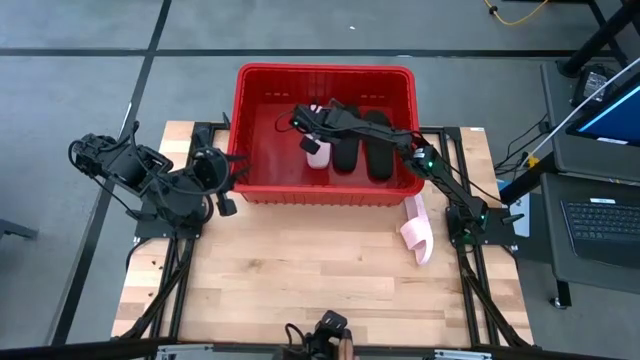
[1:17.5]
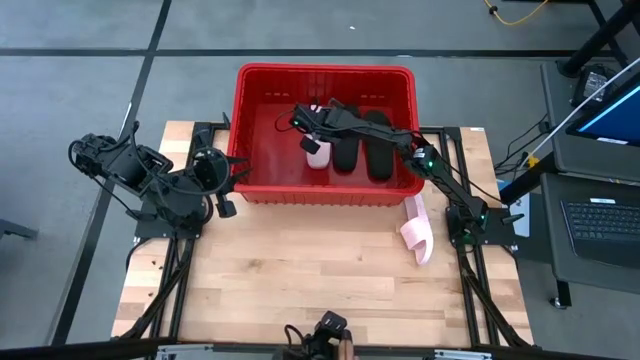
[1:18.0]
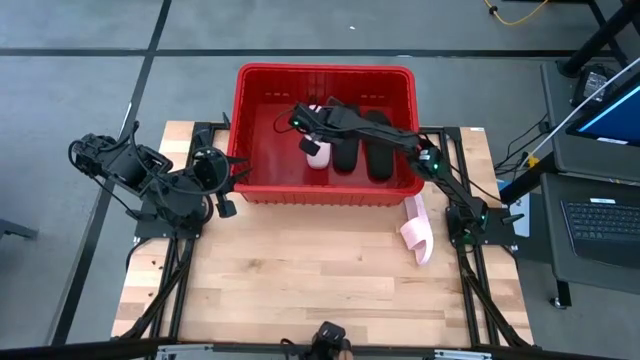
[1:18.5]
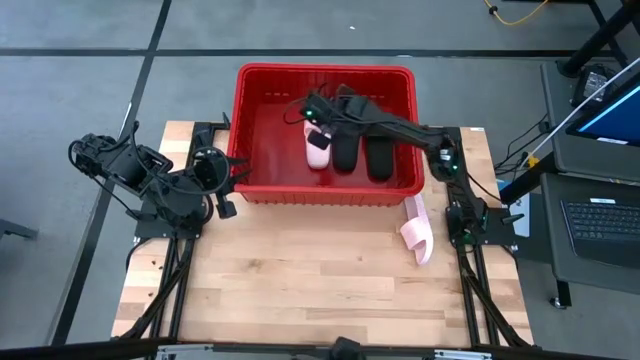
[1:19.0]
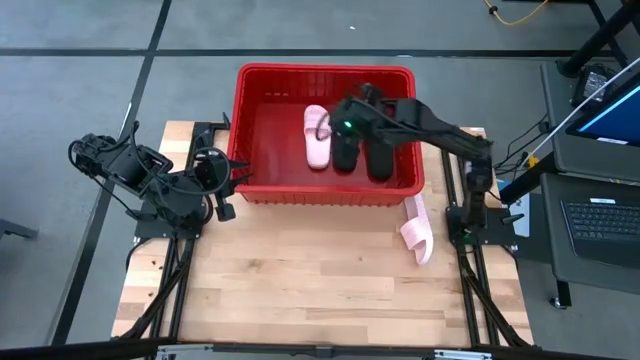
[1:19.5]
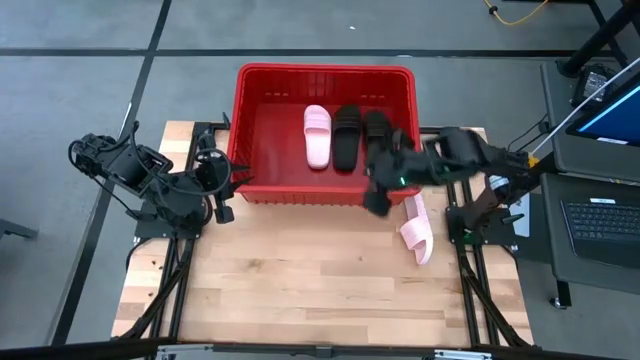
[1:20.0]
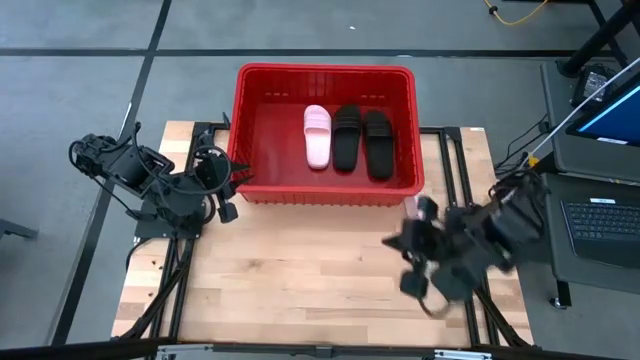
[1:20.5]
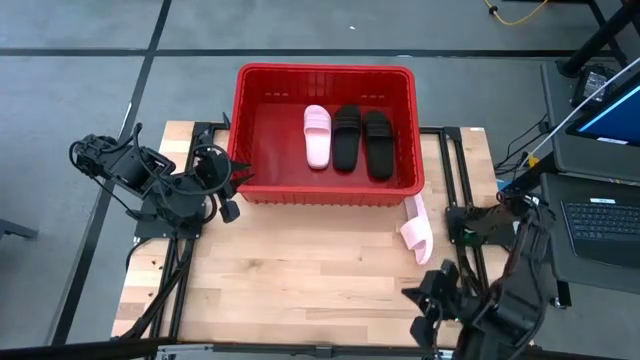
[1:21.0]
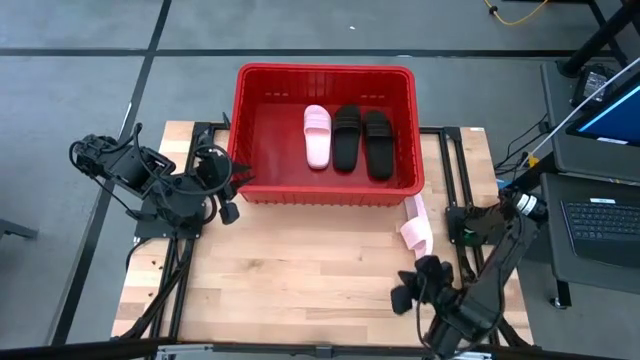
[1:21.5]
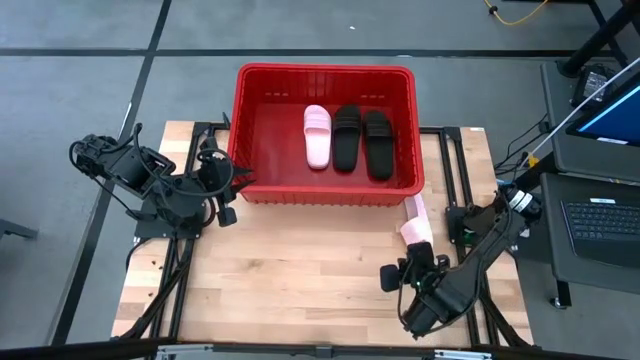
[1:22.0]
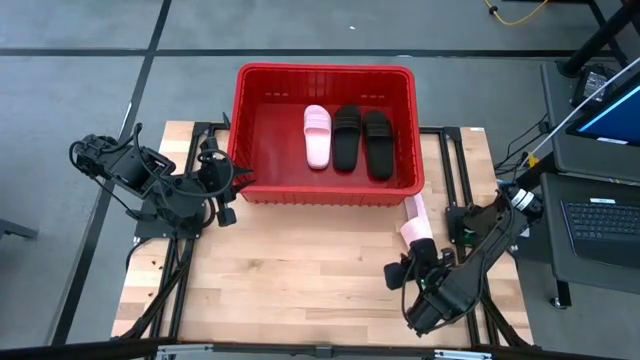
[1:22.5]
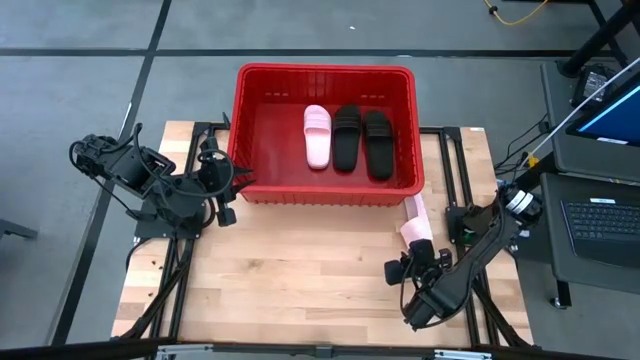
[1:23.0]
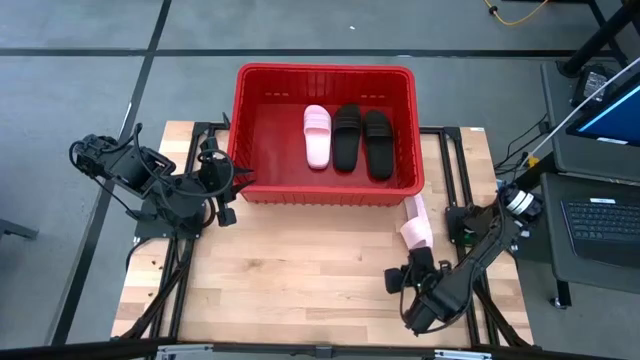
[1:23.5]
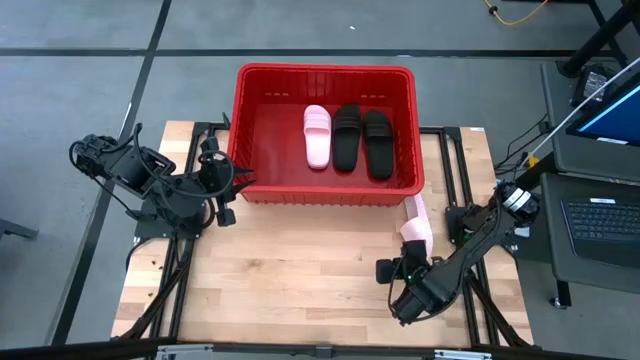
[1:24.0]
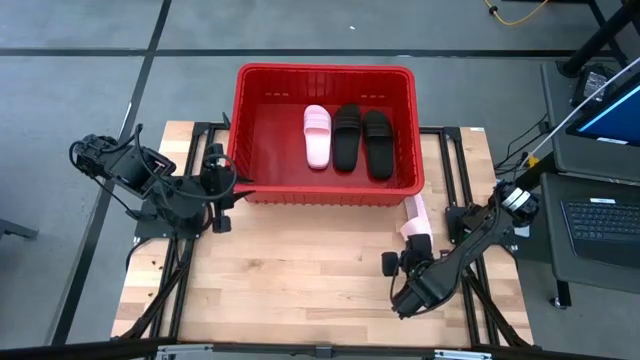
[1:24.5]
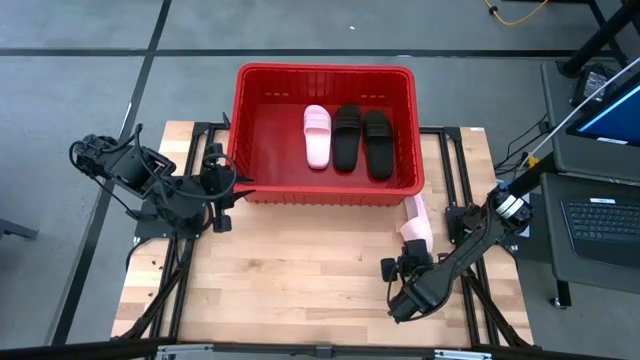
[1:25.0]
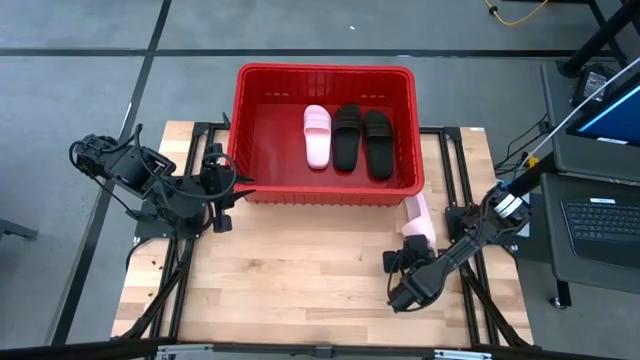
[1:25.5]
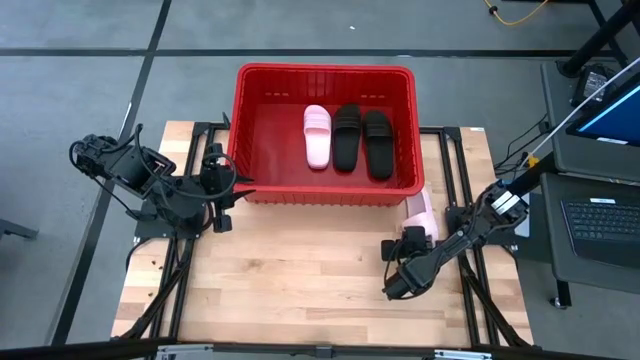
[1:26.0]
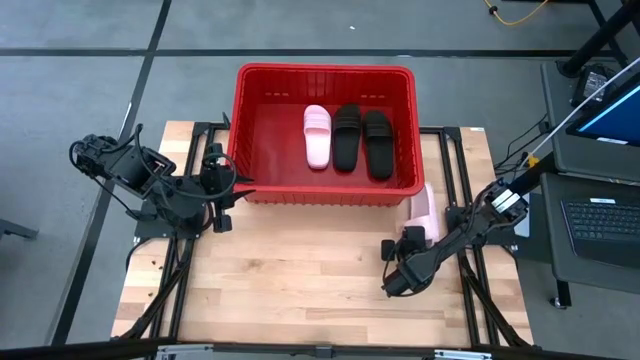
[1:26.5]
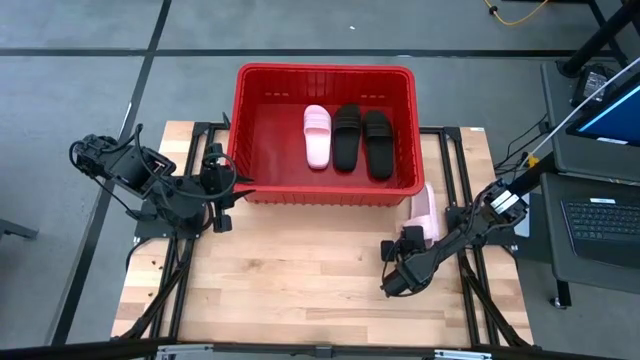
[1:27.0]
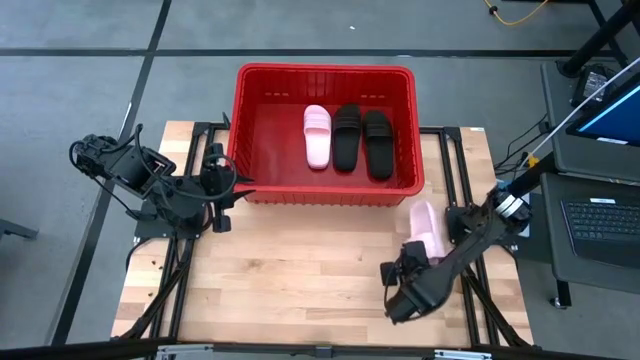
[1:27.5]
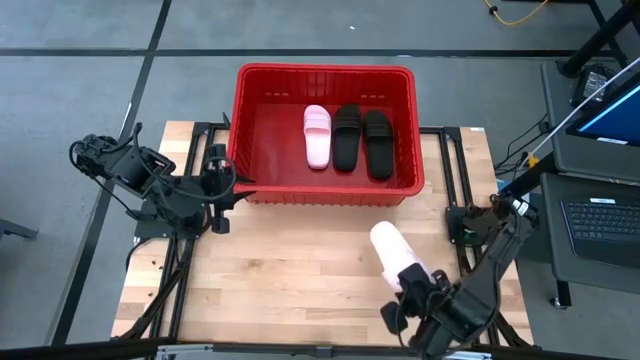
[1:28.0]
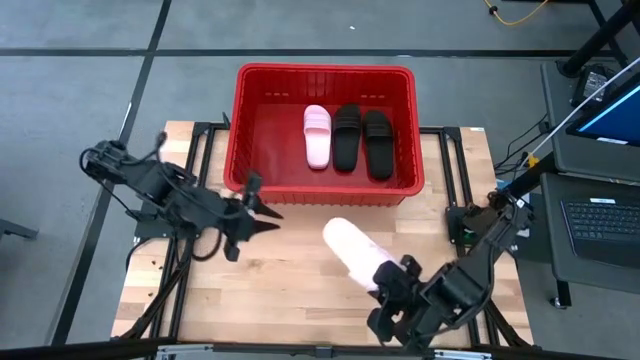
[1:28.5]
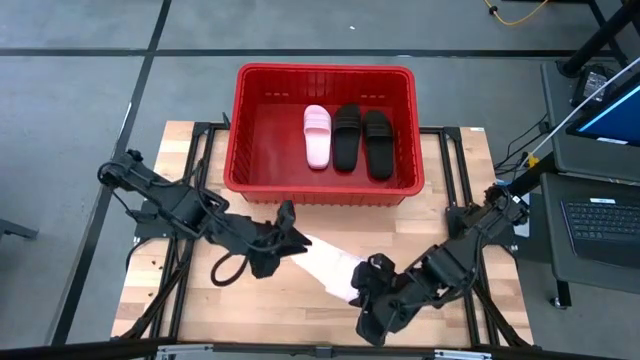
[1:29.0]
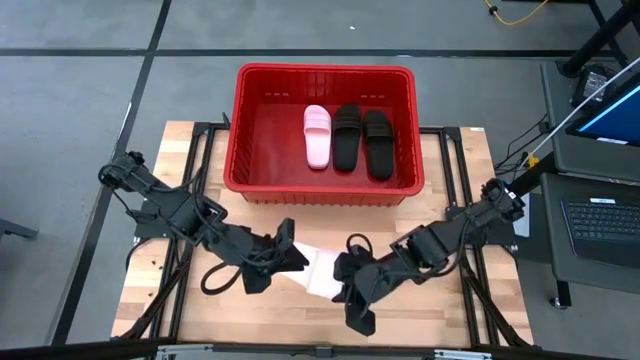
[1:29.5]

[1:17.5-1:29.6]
Task: Pick and place slides into bin
Put the pink slipper into the red bin

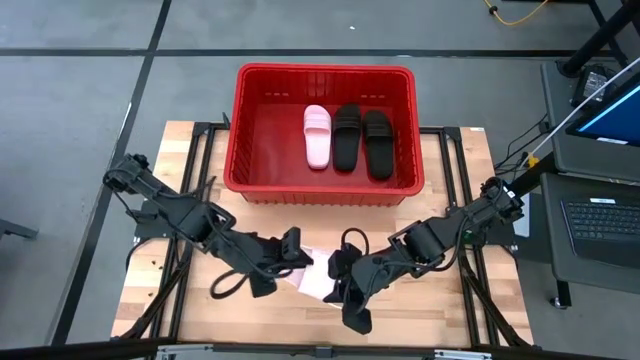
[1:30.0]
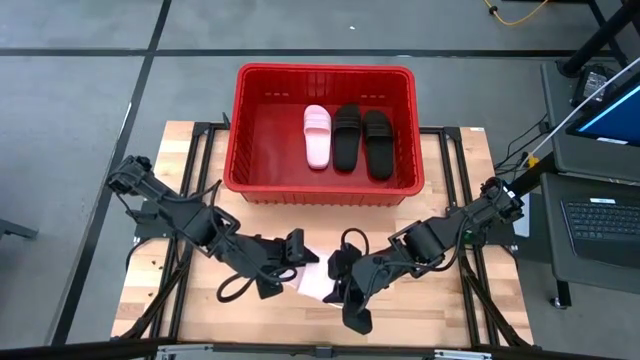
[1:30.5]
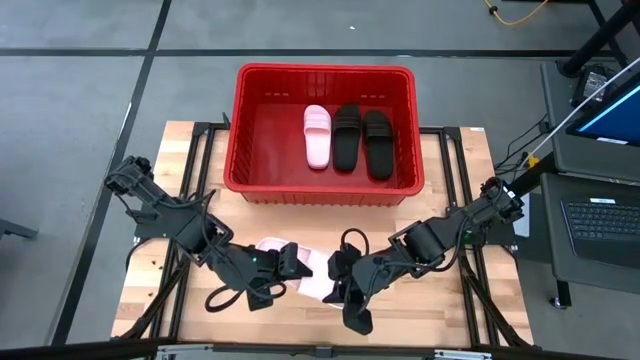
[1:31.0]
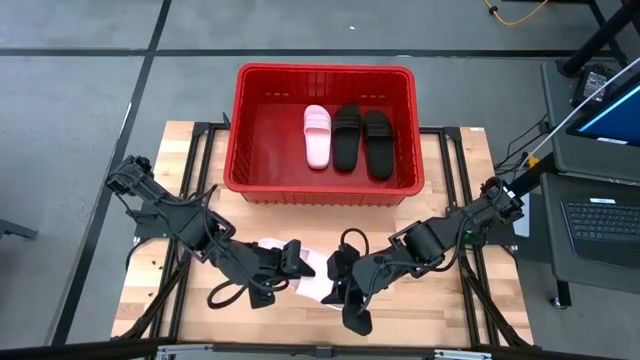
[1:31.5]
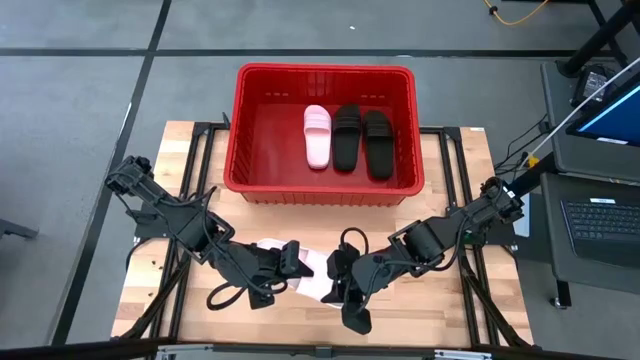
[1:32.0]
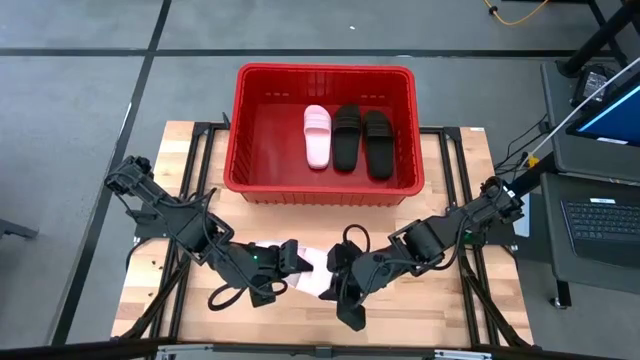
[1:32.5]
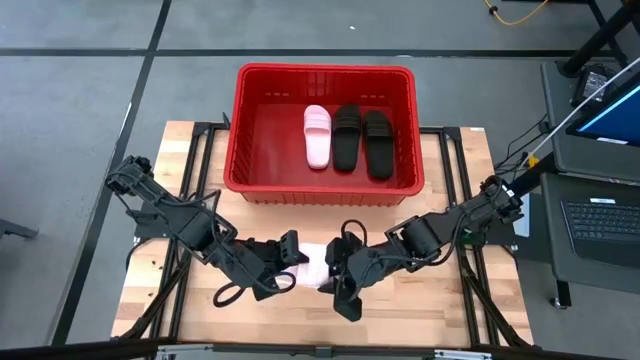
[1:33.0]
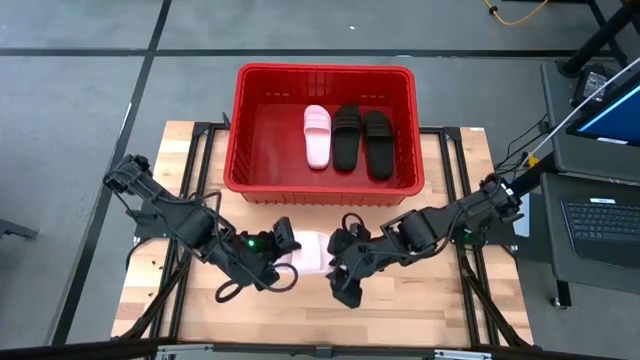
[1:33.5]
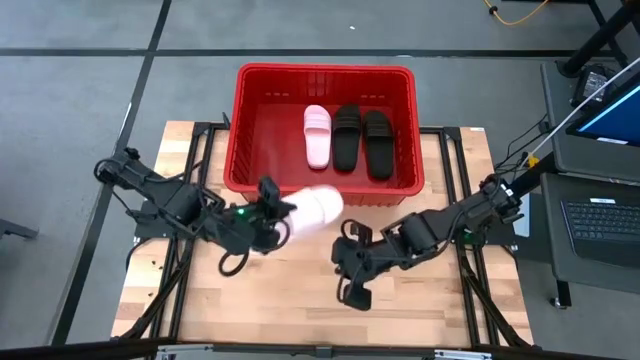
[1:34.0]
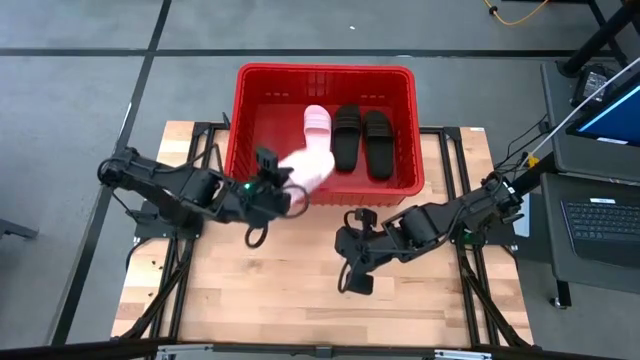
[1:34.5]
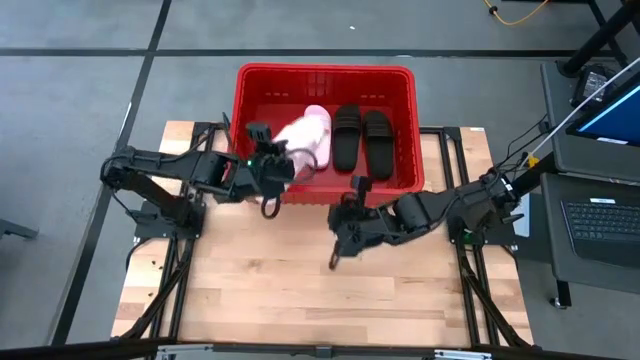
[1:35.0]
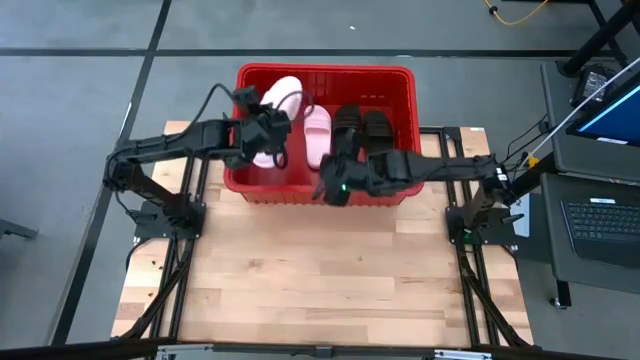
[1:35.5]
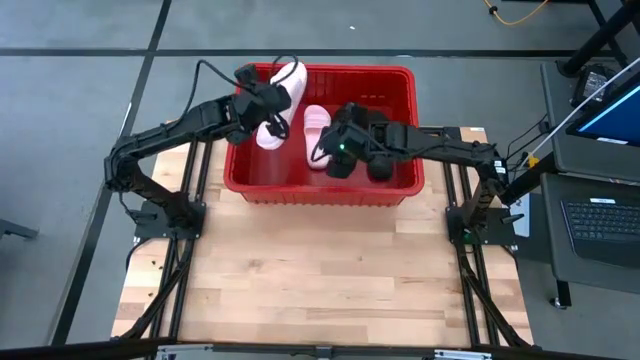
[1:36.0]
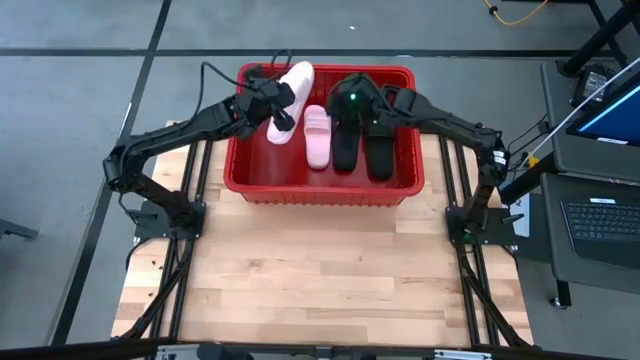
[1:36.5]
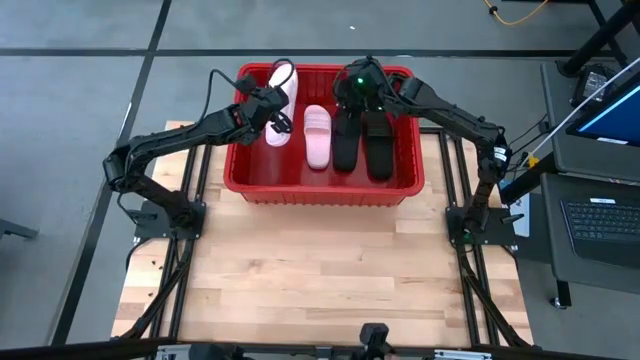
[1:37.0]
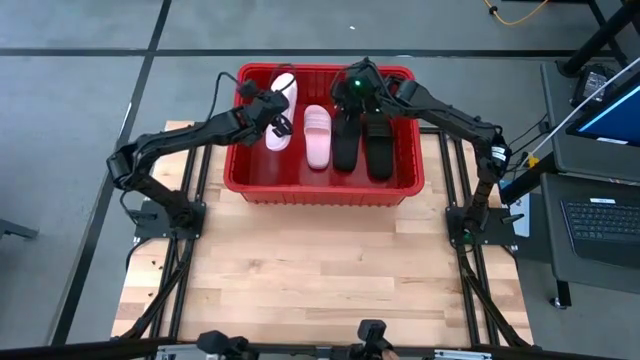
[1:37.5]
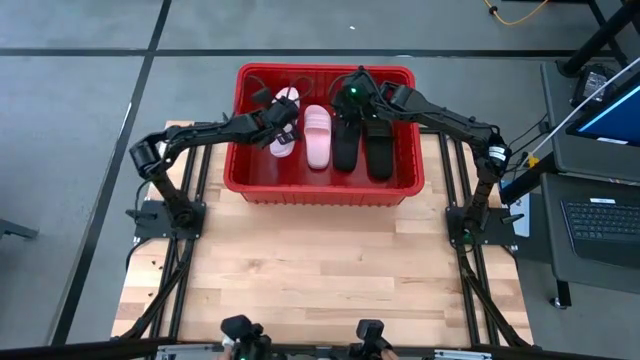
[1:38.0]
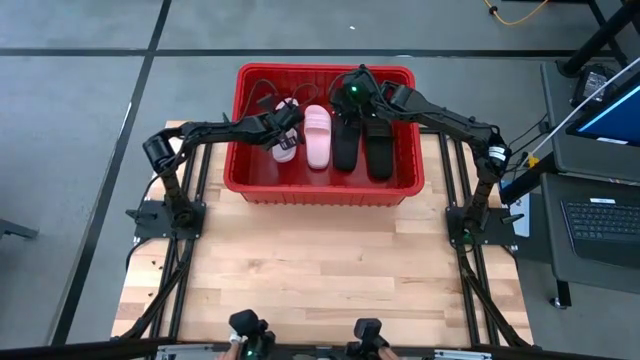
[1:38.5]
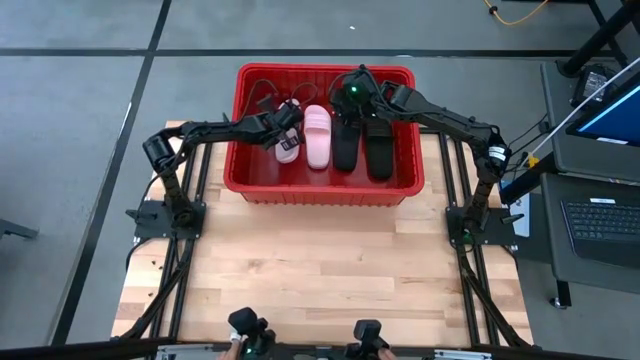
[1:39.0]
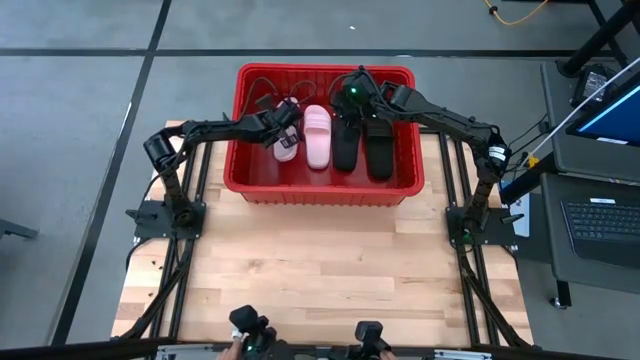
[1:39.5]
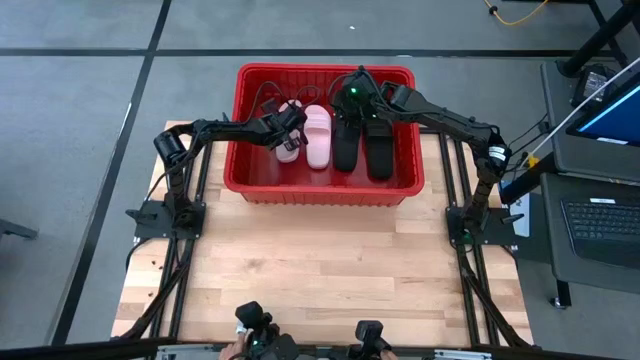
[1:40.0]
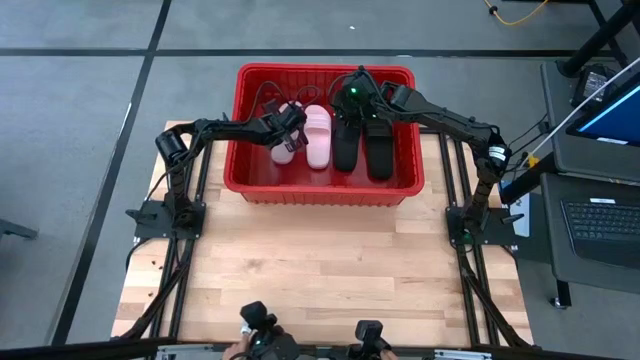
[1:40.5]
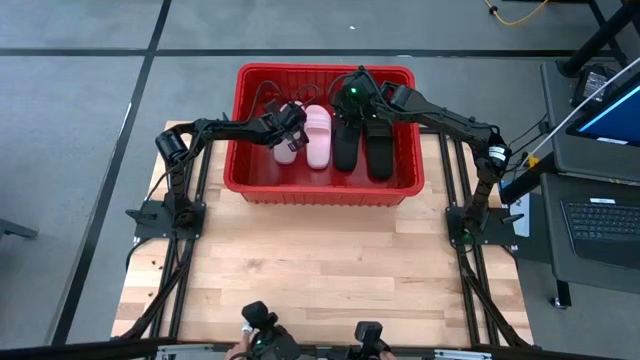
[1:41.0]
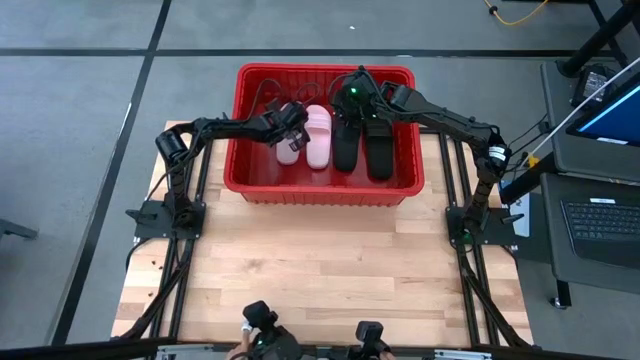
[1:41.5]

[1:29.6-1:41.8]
Put the pink slipper into the red bin
